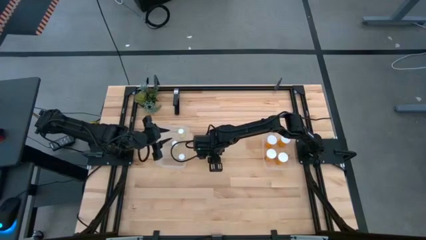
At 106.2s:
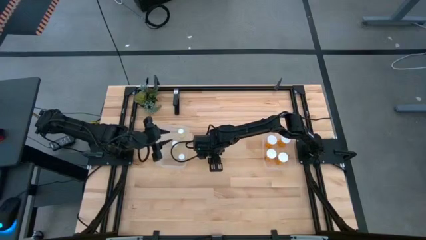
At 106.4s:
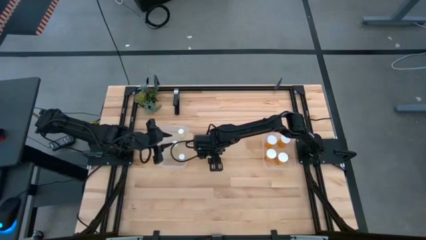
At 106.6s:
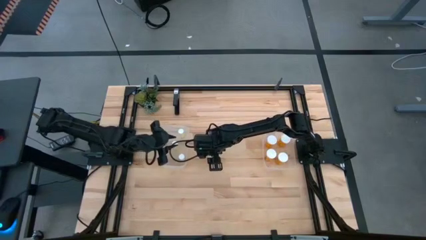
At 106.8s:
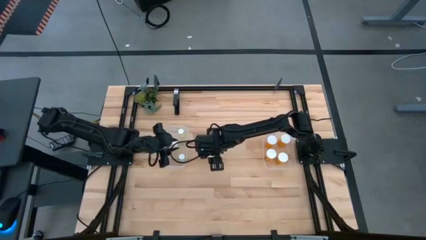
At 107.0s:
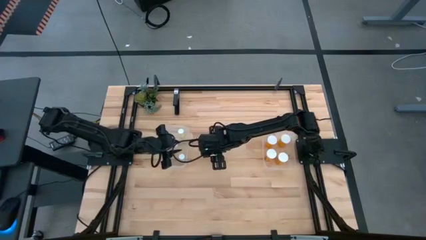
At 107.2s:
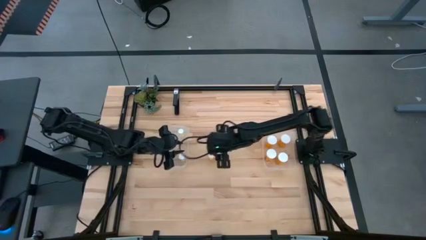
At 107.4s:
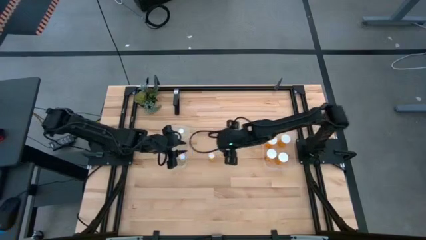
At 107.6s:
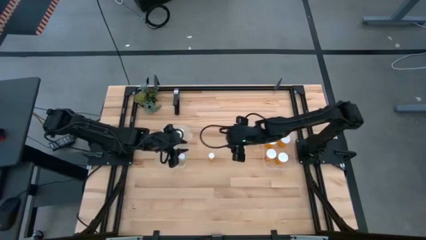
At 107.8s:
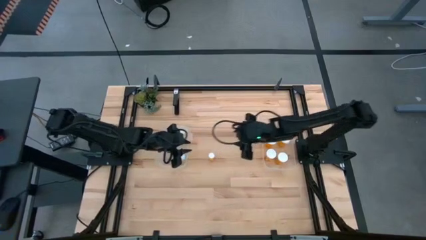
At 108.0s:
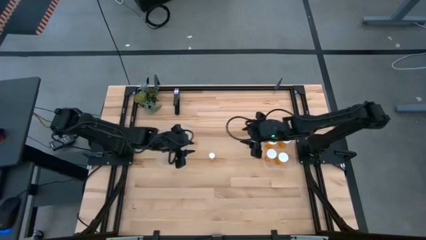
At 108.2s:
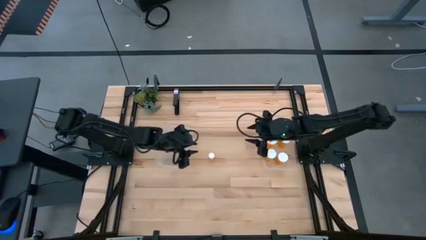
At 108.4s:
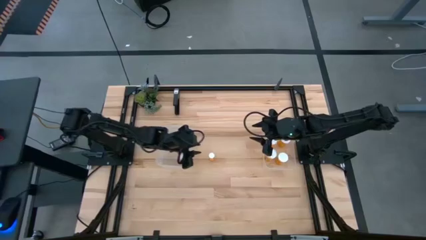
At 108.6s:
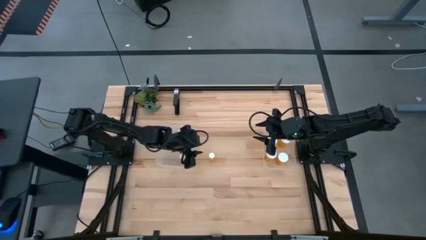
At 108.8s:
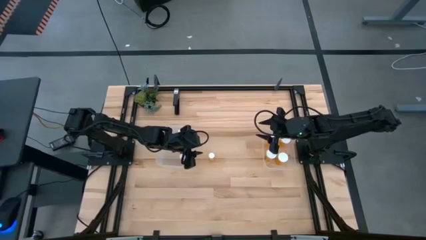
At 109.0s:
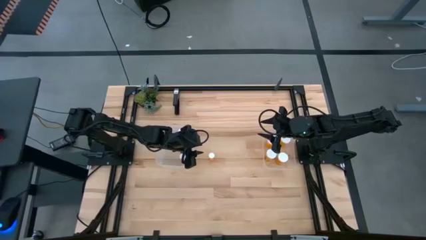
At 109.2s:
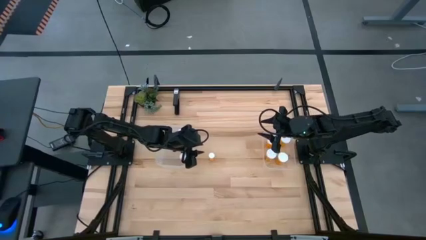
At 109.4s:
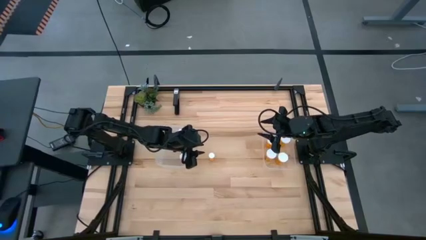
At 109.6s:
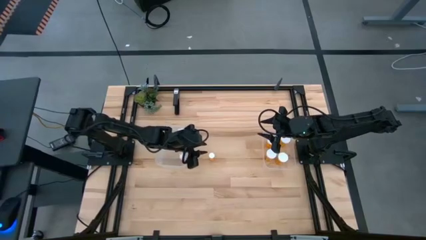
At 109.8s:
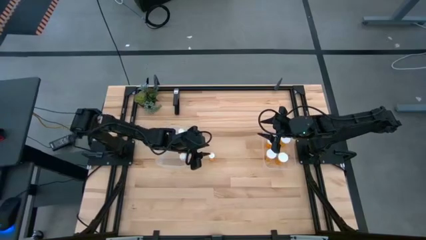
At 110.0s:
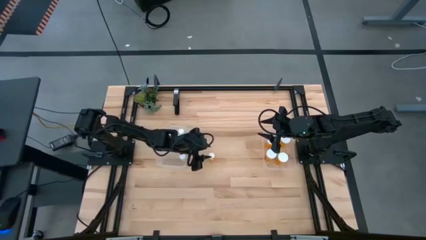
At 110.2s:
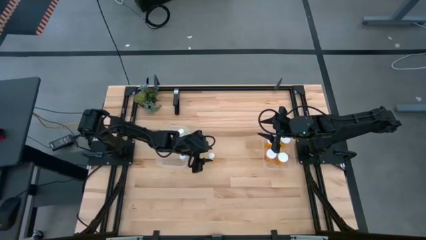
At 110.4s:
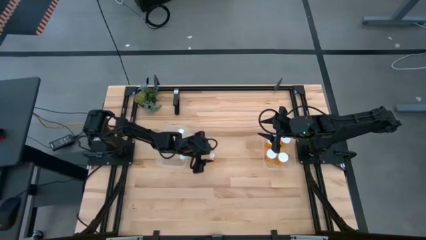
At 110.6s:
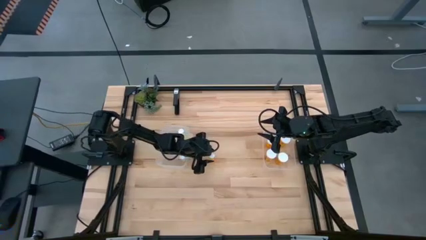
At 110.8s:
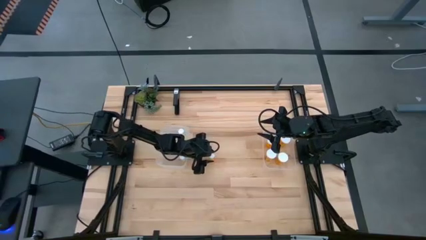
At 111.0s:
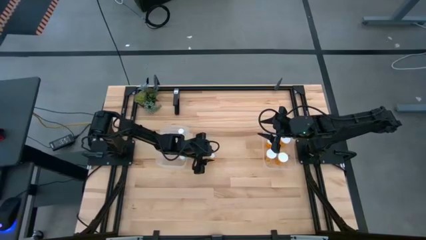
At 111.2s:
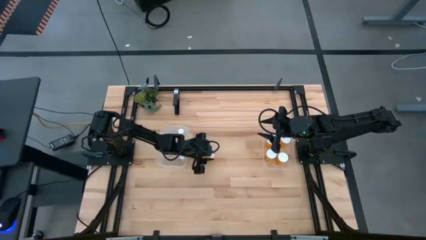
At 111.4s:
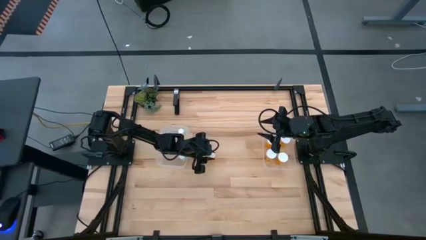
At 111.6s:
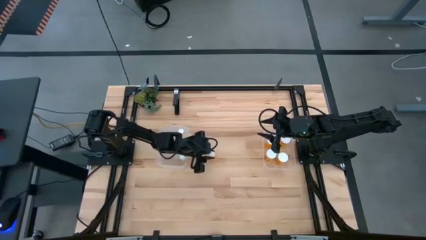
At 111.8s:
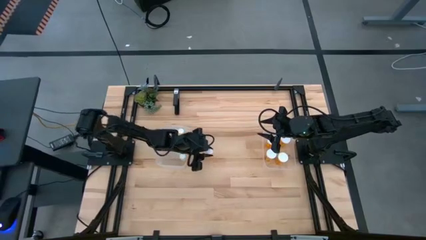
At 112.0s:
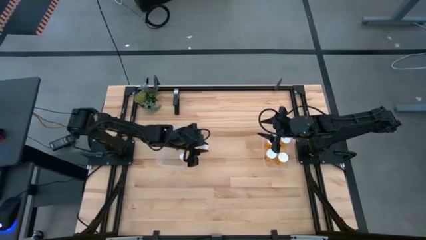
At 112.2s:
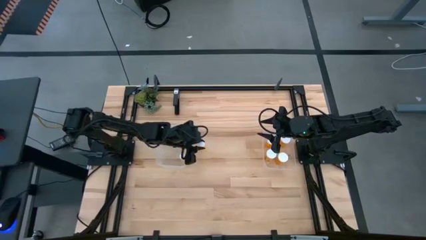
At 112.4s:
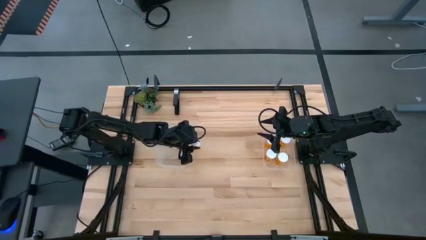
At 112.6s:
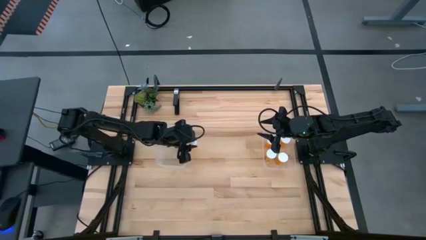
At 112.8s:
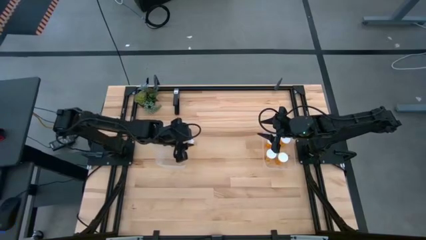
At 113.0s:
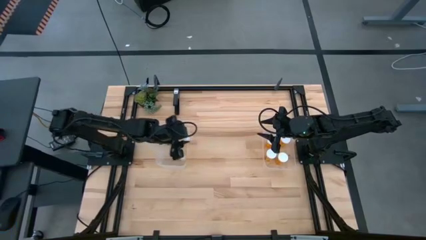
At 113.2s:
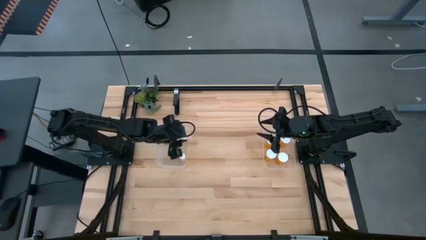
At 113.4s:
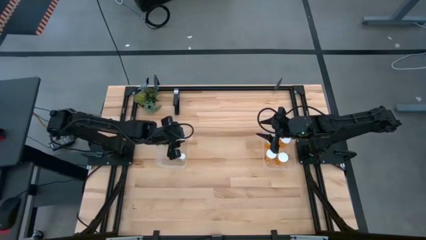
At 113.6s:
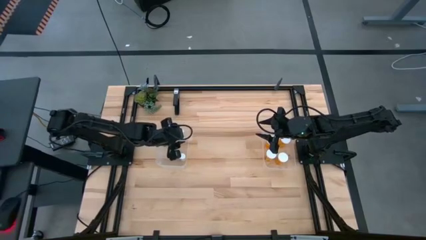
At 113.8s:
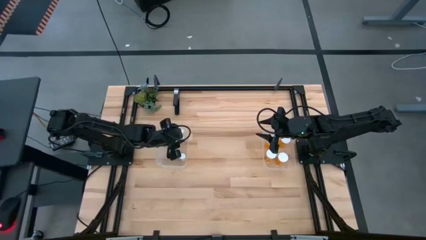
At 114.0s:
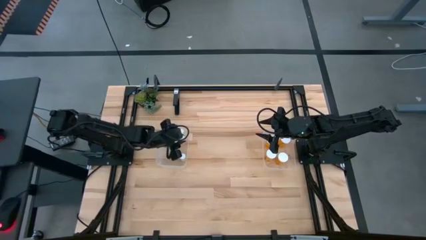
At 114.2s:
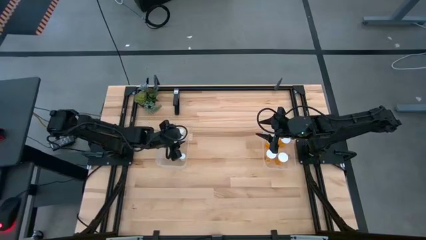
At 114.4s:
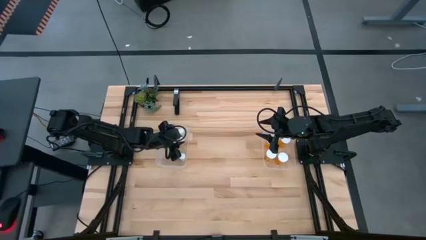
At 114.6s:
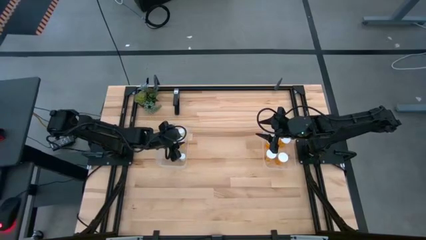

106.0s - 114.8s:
Task: Pick and place medicine bottles into bin by pill shape (circle, oval)
Put the orange pill bottle into the left transparent bin

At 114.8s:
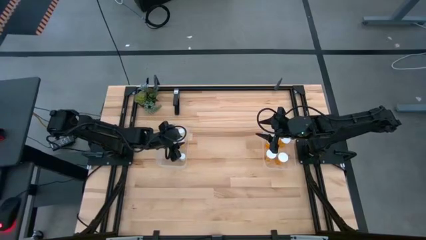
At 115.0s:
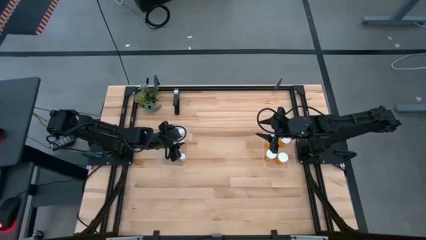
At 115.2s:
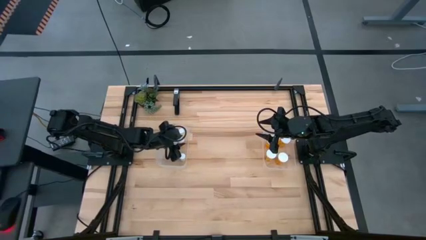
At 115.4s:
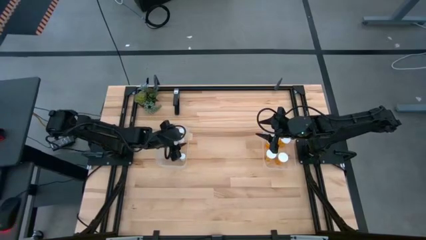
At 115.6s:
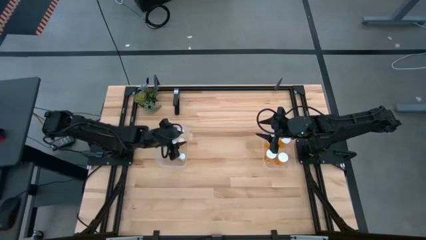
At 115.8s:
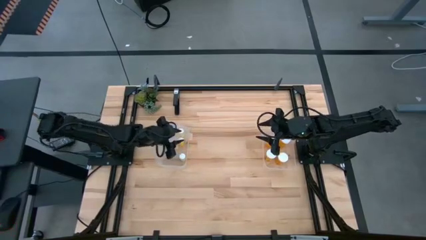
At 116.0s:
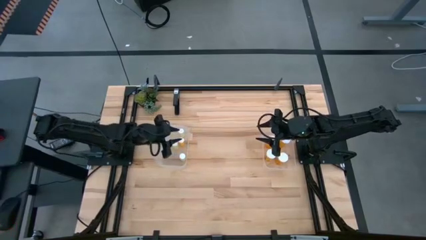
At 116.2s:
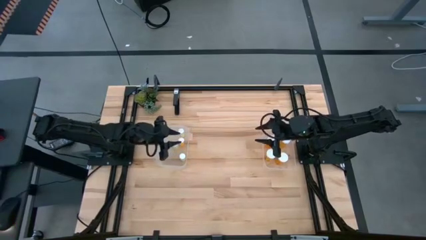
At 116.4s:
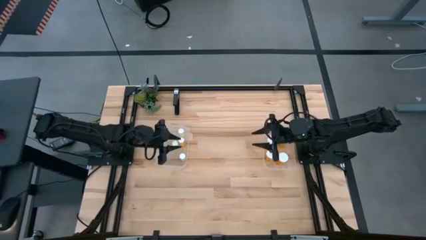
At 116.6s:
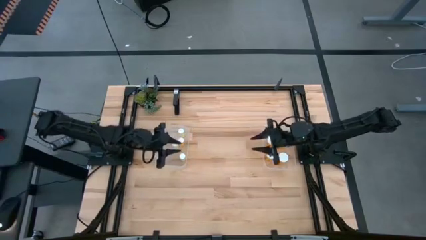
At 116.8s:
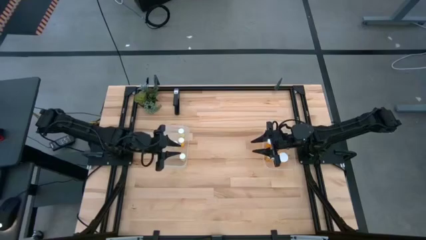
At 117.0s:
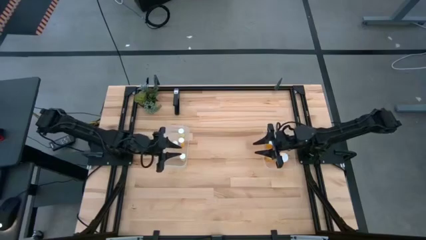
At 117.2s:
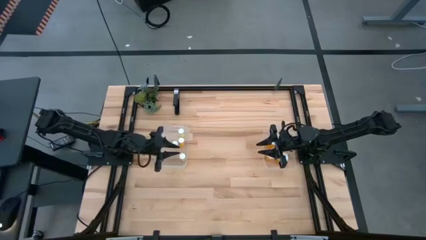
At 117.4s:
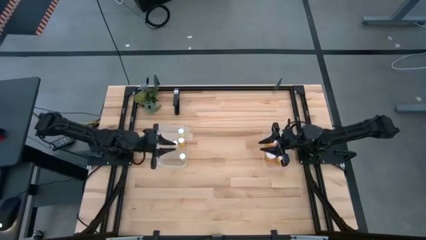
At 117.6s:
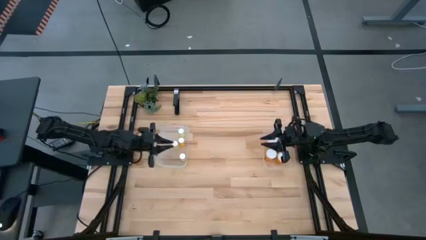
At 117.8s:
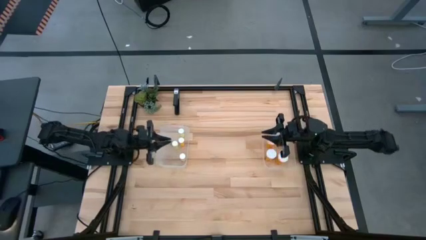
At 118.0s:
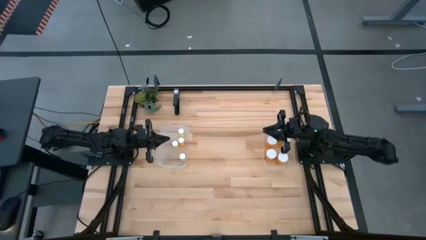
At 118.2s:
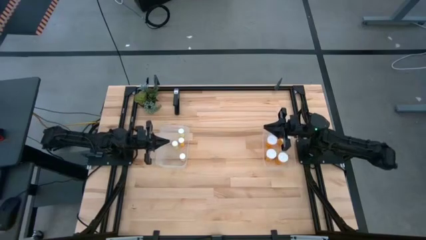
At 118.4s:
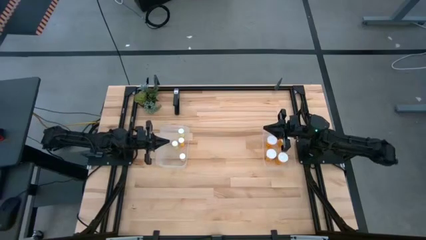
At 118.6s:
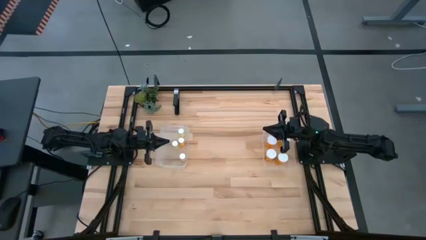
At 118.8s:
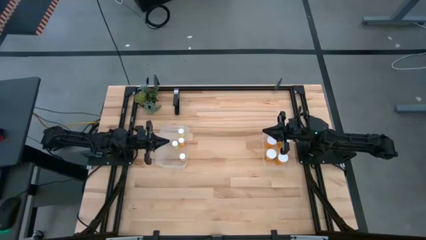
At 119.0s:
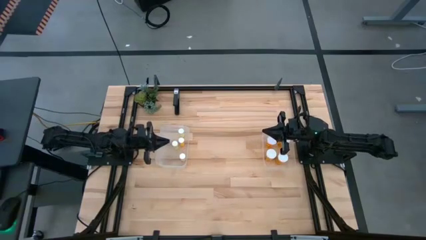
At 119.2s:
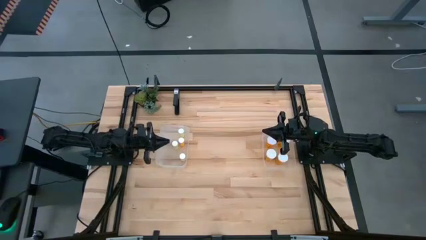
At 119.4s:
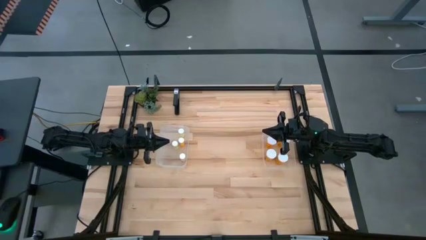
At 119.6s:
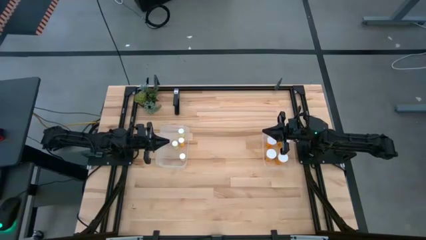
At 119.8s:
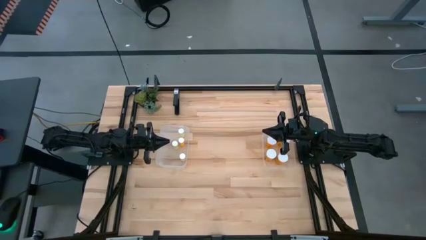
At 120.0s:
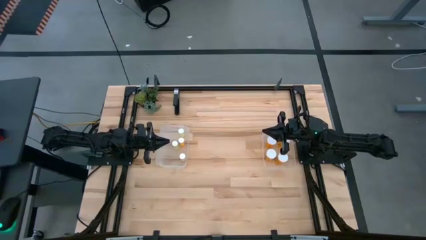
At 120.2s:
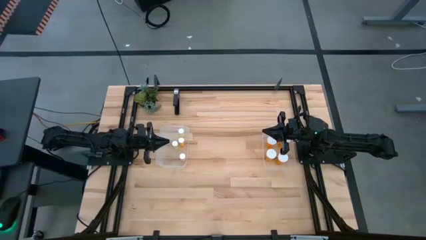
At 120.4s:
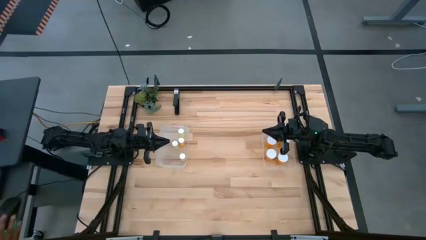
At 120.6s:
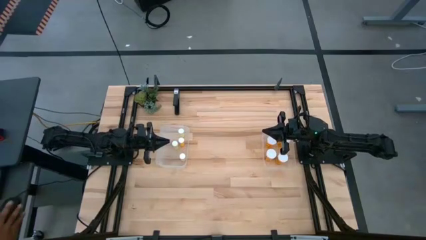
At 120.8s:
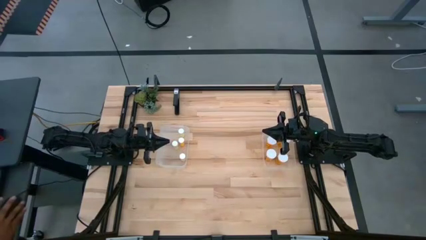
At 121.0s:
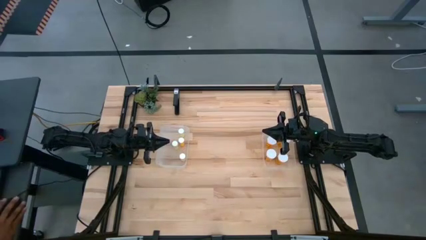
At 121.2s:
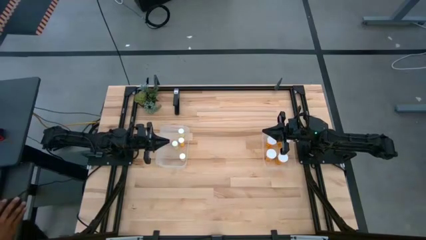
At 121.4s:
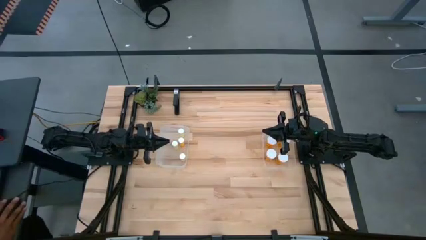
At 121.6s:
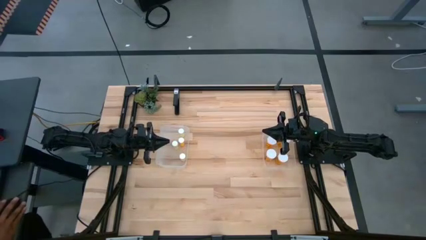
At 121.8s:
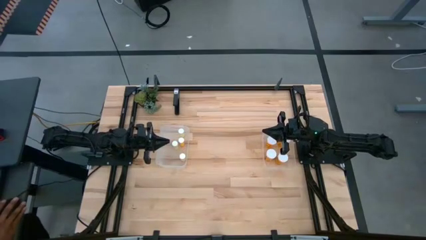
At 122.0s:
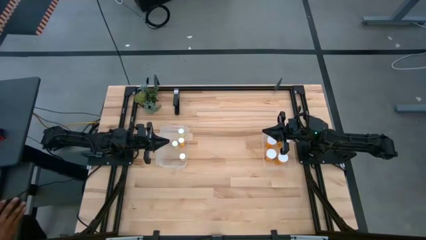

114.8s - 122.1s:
Return to Home Position
